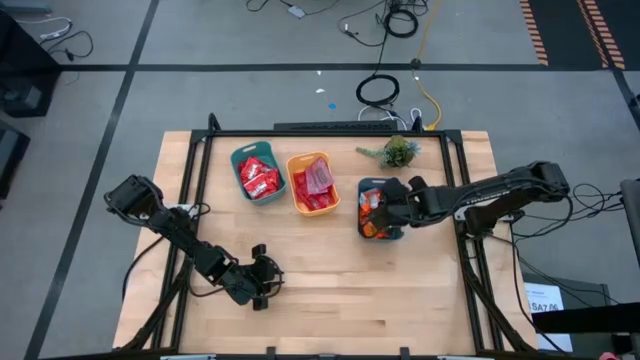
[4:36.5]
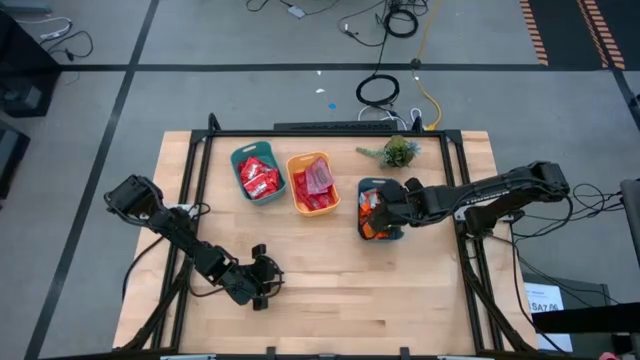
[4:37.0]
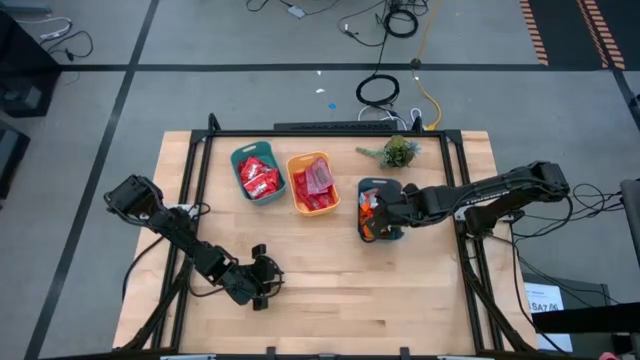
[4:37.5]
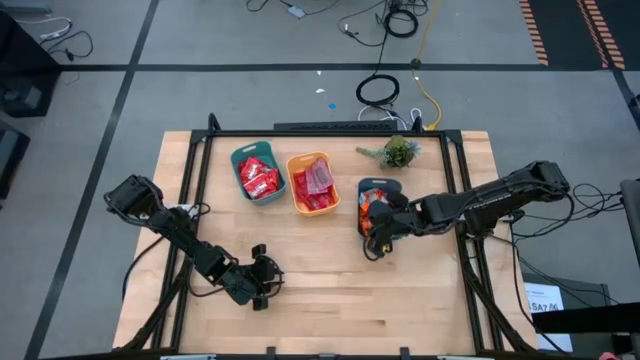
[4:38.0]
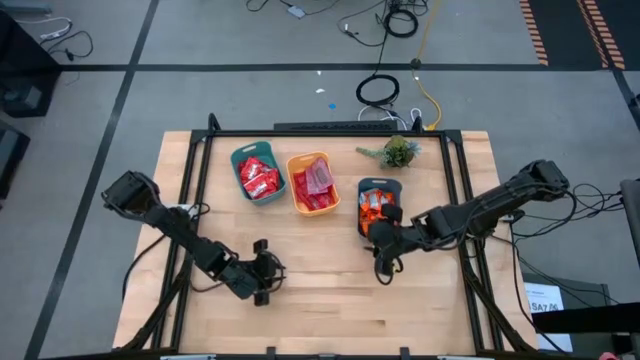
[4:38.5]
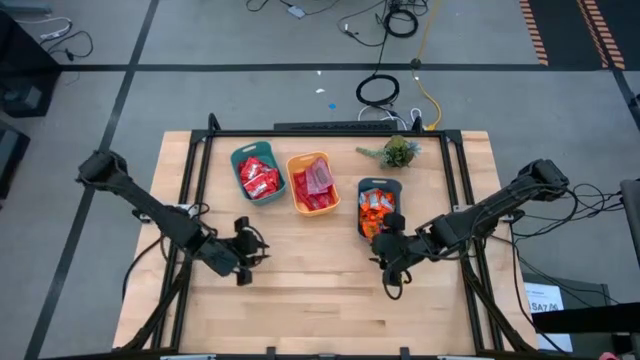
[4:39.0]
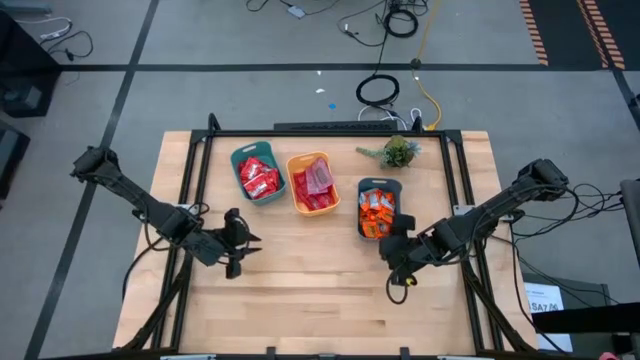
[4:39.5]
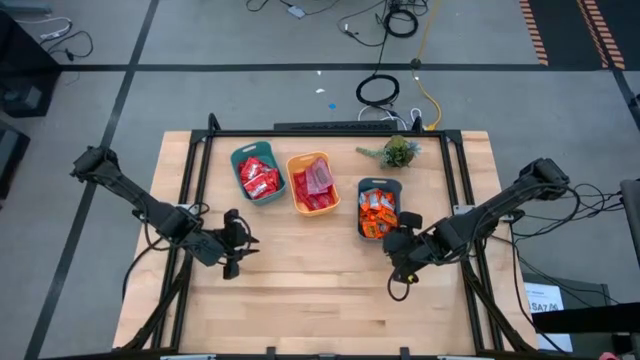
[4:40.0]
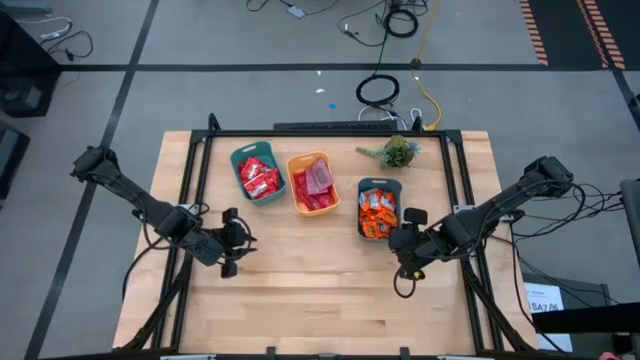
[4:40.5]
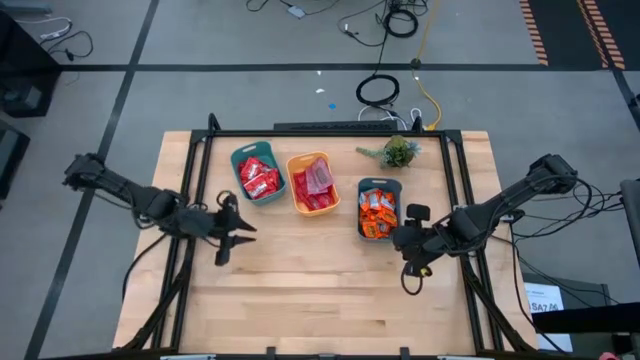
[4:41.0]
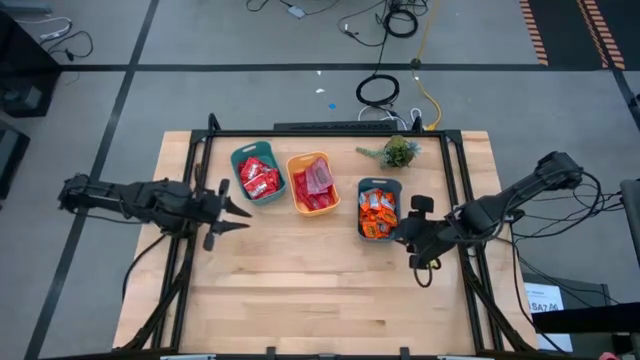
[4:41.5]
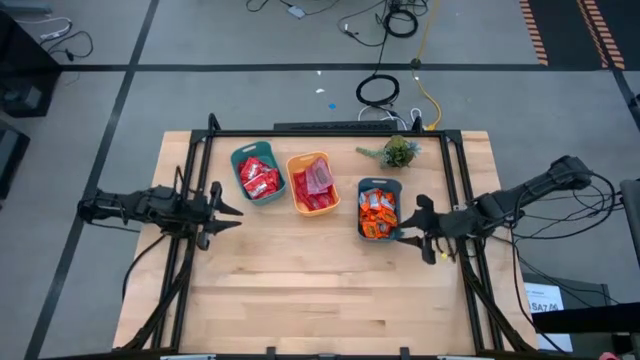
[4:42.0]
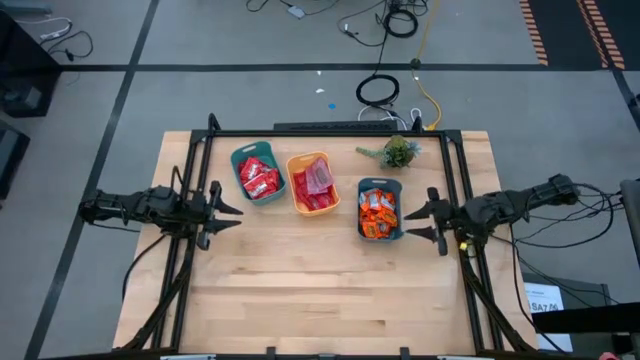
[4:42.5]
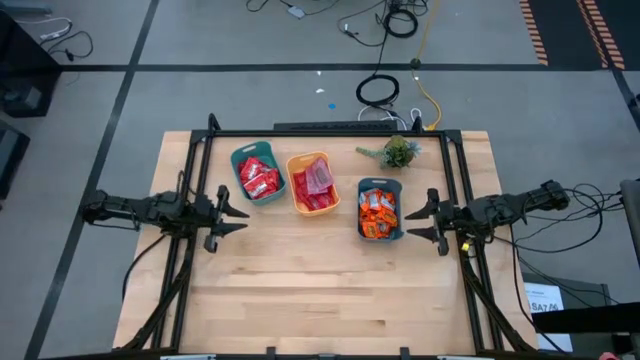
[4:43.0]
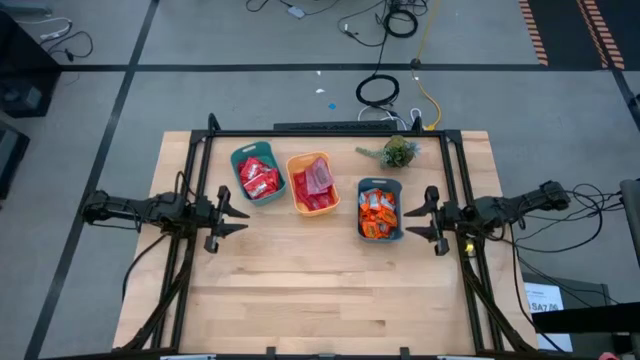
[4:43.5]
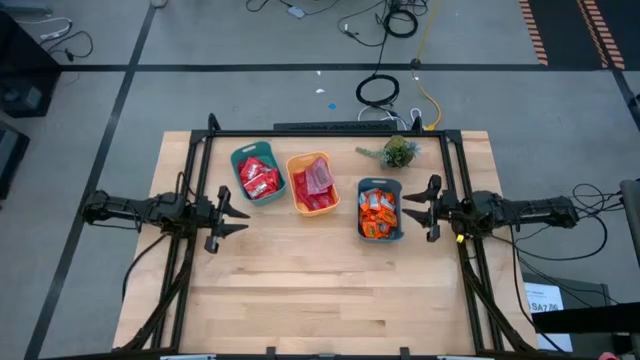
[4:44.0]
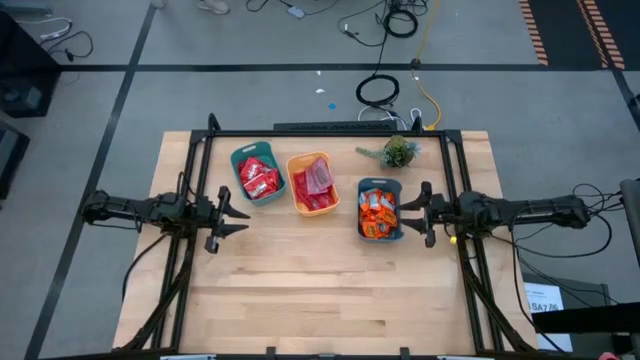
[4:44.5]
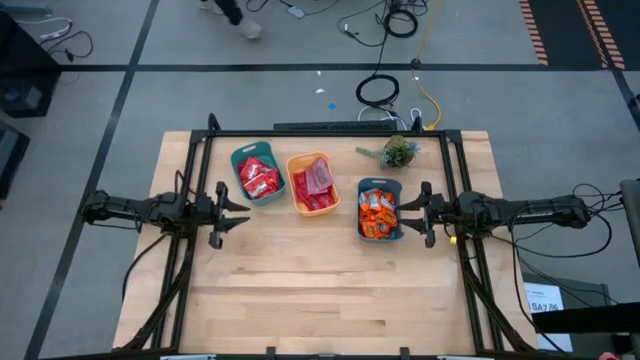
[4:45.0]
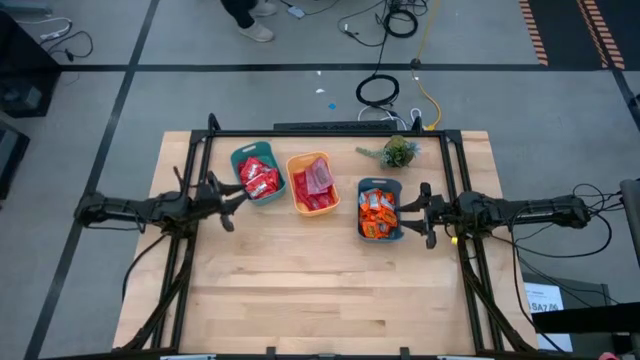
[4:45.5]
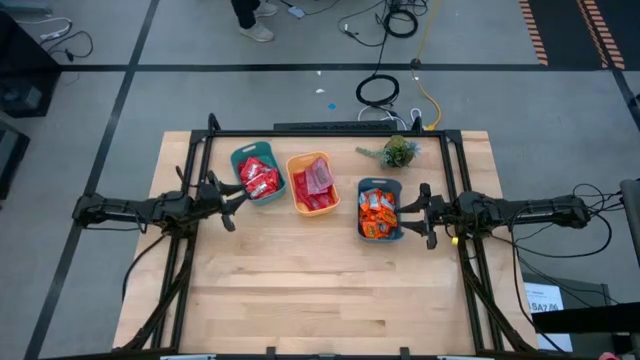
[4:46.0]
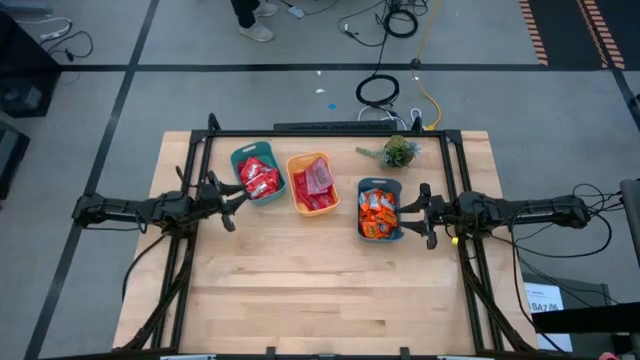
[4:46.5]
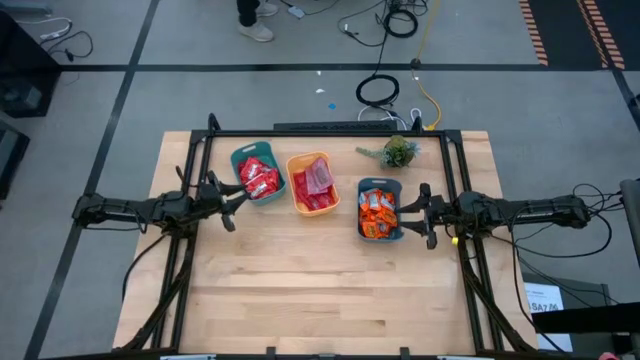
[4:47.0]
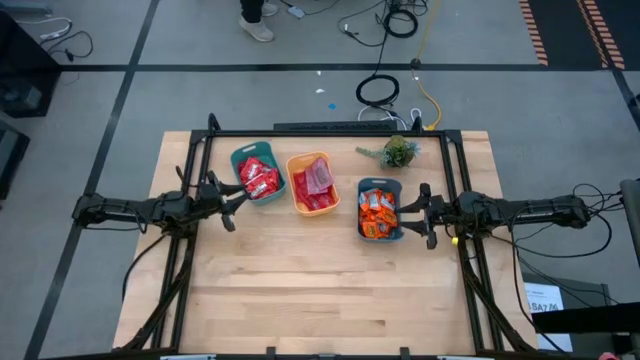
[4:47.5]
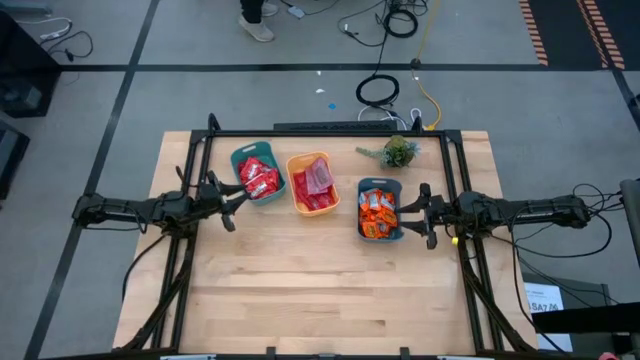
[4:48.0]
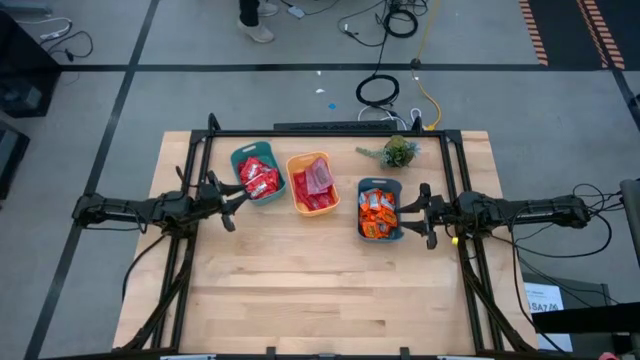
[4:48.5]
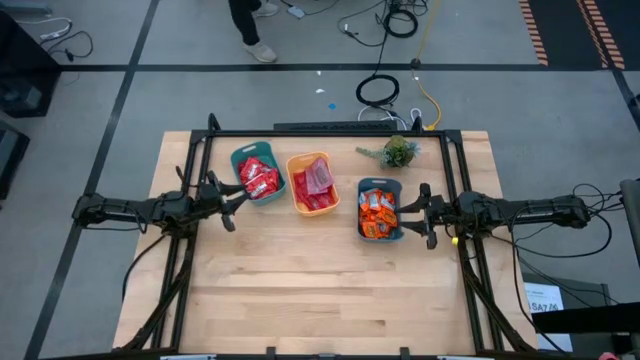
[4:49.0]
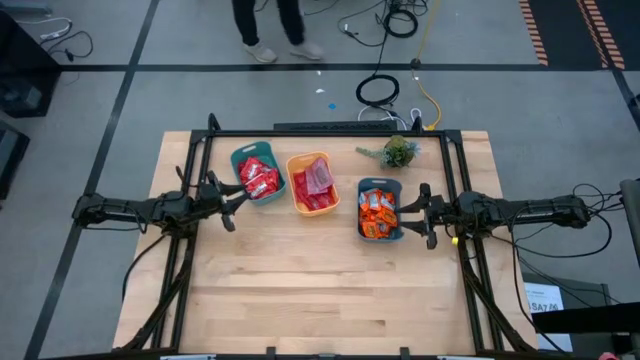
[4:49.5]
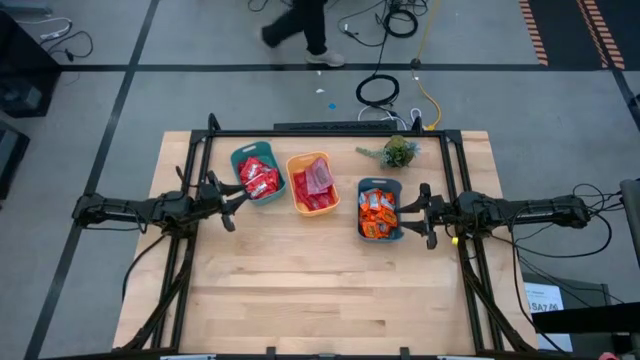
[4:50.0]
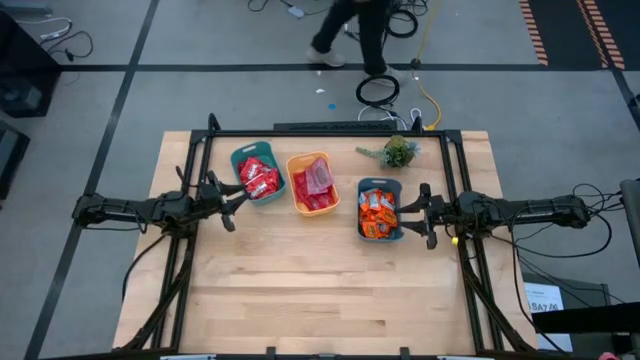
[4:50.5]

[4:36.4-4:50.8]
Task: Sort candy
Return to Home Position

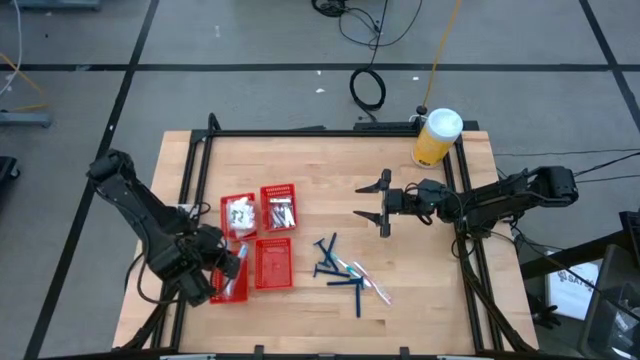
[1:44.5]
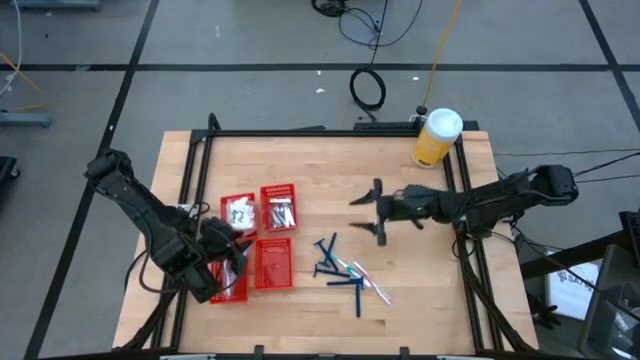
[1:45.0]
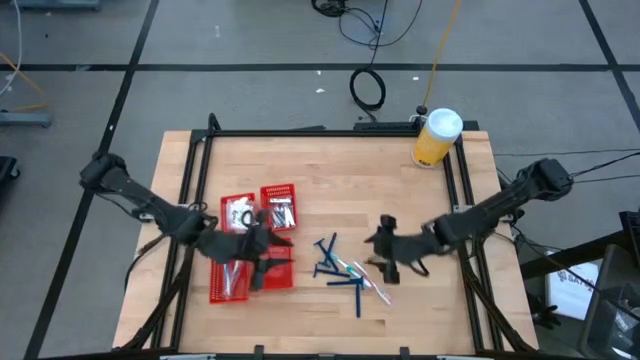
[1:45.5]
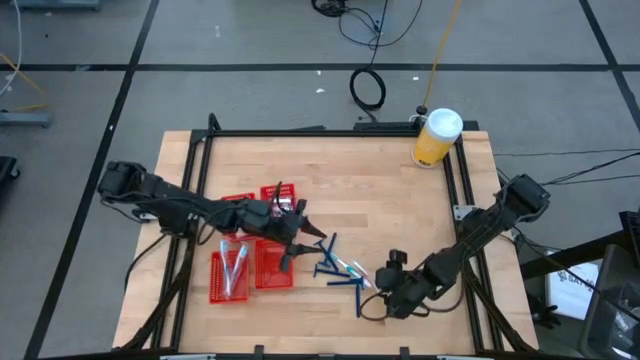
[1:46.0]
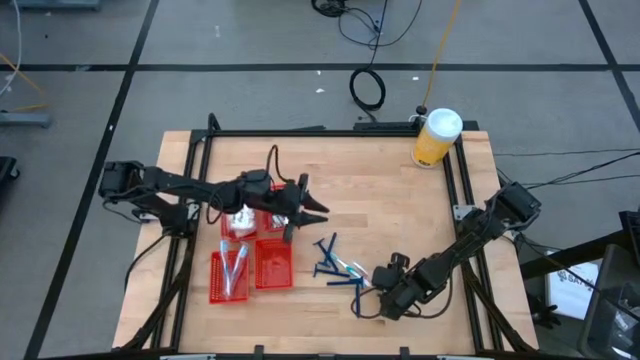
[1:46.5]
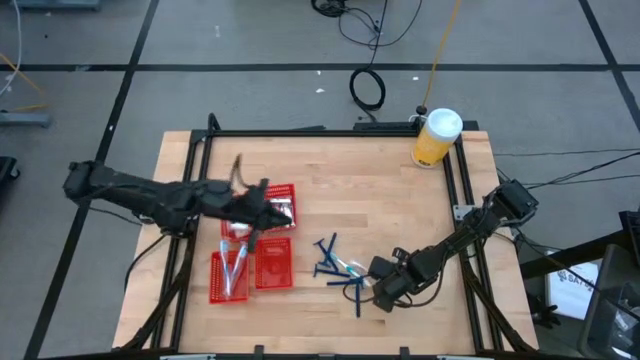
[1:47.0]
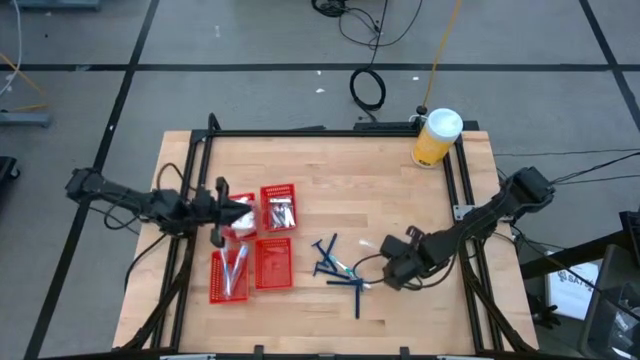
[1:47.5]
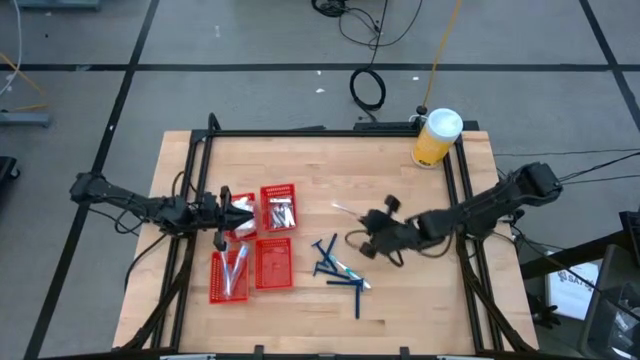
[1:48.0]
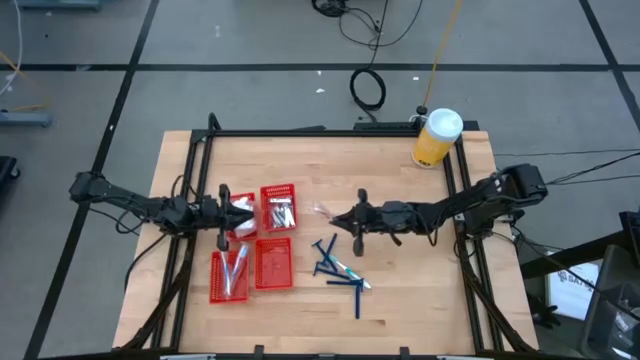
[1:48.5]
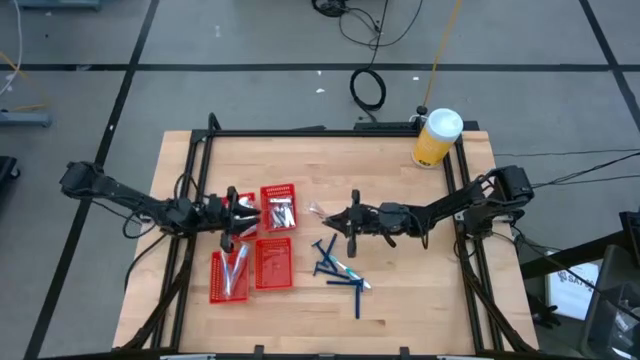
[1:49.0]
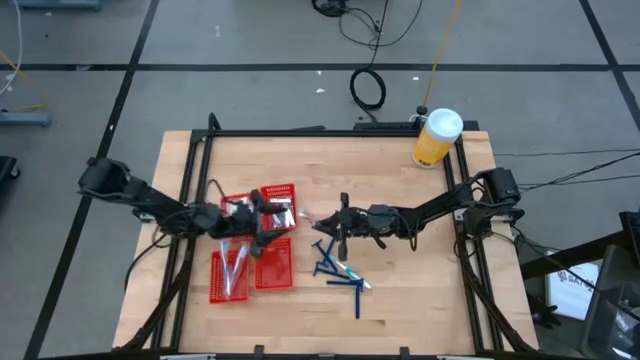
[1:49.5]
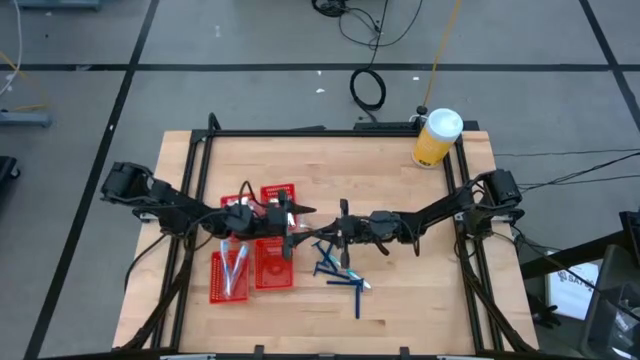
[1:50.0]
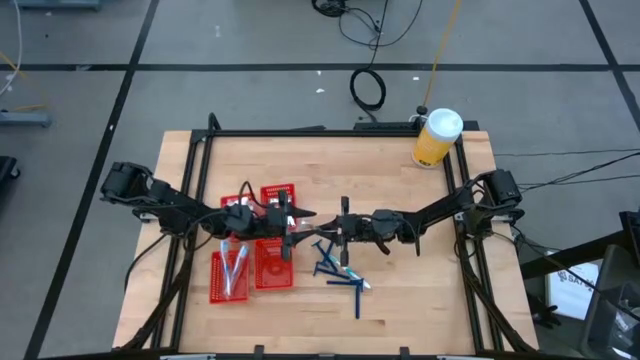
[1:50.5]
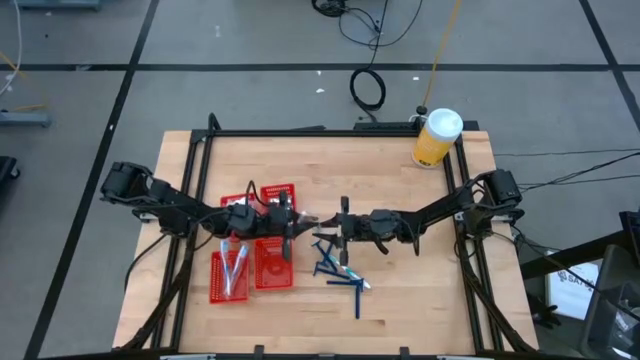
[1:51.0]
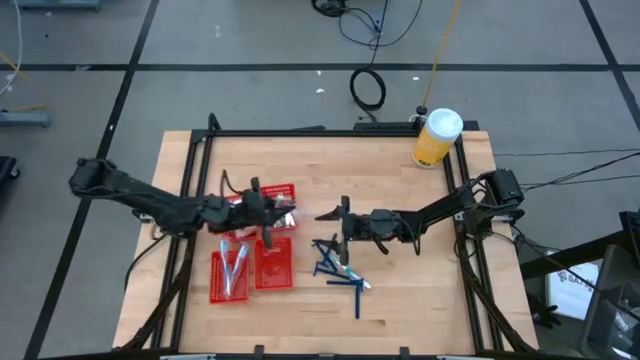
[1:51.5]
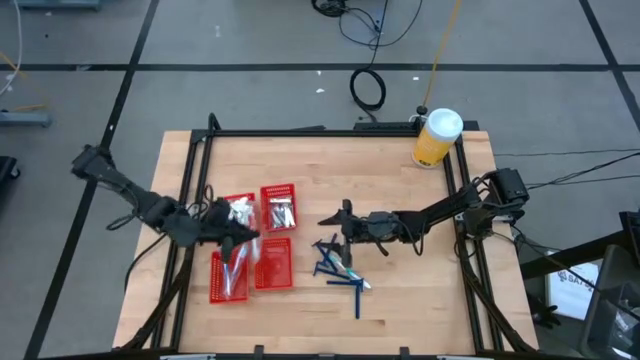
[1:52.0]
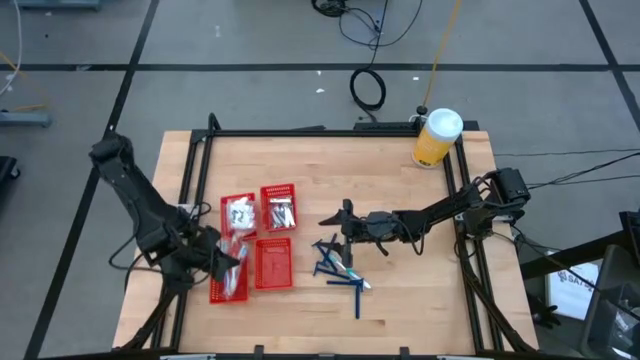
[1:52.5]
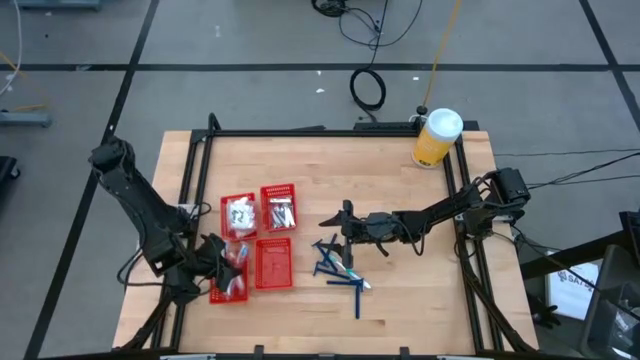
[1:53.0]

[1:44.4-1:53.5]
Task: Pick & Place Travel size toiletries
Put the red toothbrush into the bottom left red basket
